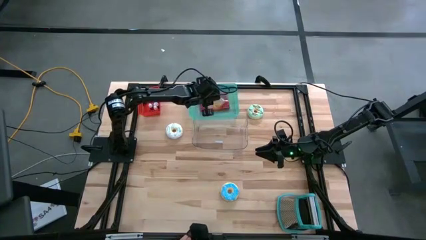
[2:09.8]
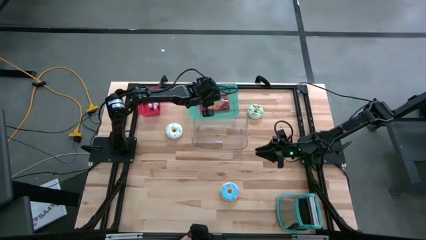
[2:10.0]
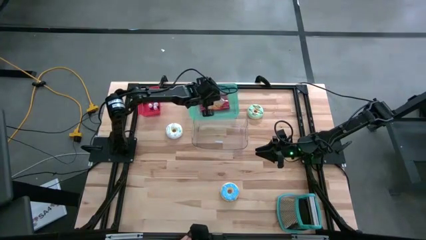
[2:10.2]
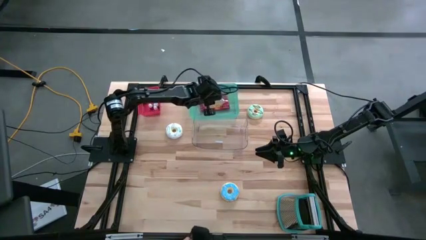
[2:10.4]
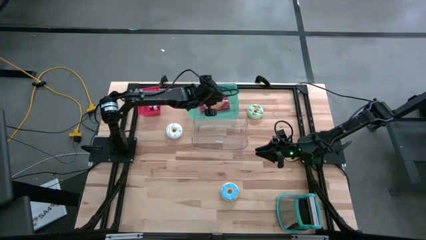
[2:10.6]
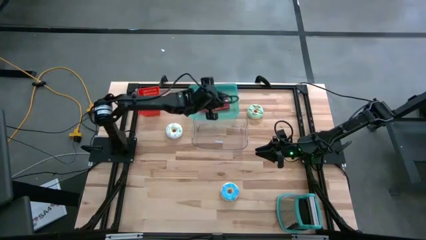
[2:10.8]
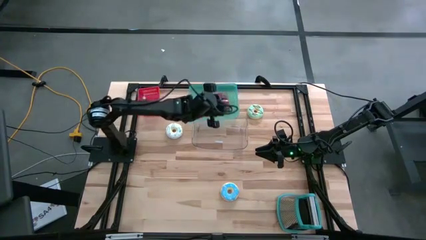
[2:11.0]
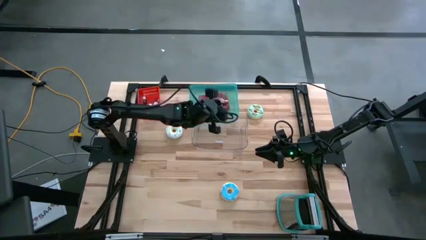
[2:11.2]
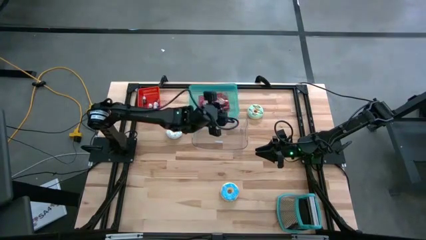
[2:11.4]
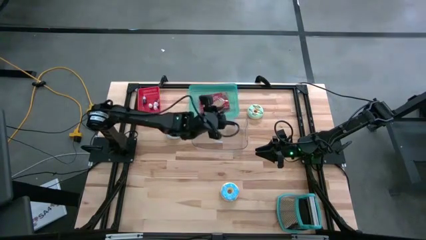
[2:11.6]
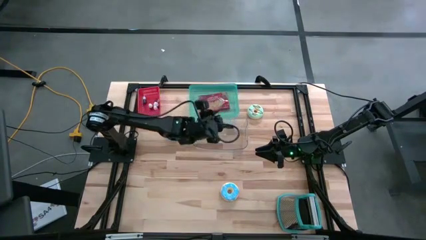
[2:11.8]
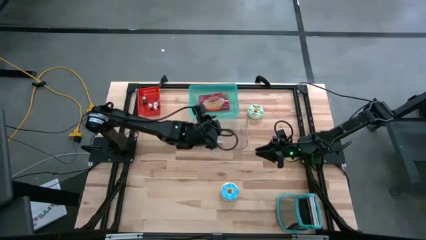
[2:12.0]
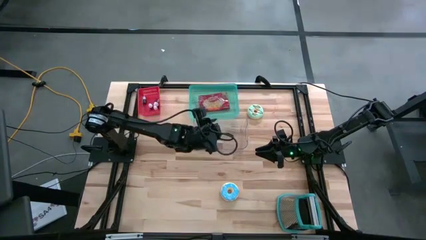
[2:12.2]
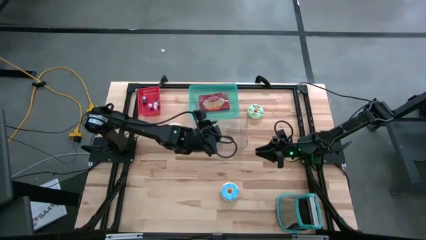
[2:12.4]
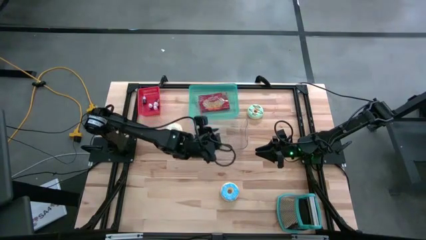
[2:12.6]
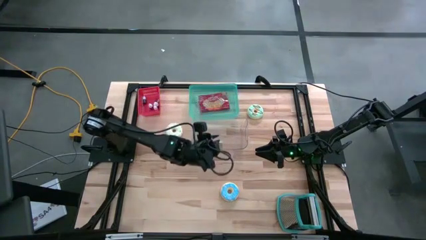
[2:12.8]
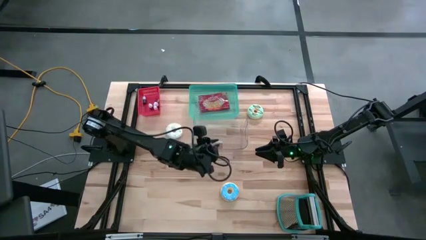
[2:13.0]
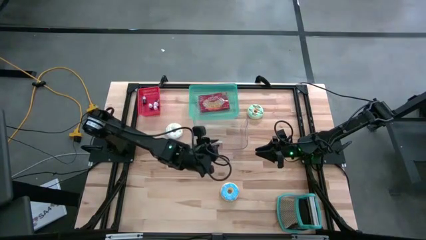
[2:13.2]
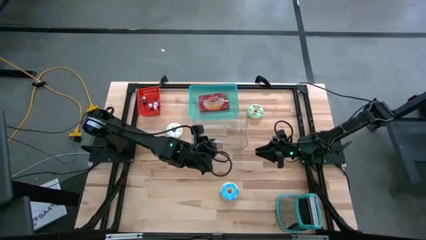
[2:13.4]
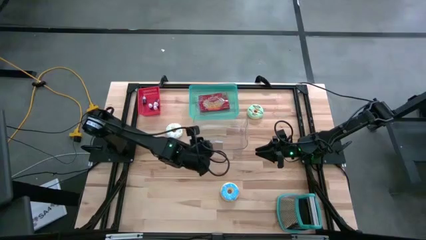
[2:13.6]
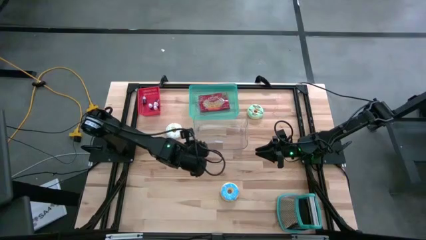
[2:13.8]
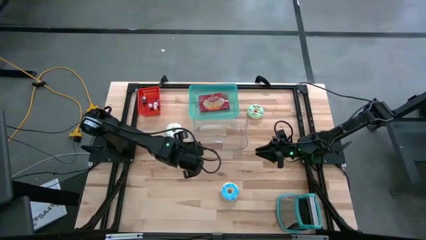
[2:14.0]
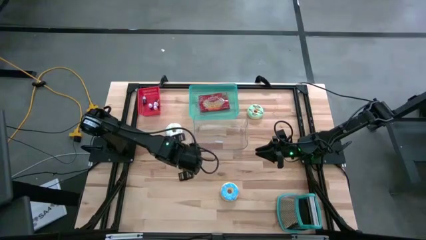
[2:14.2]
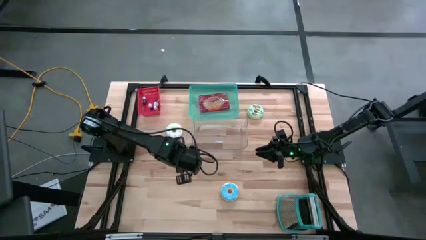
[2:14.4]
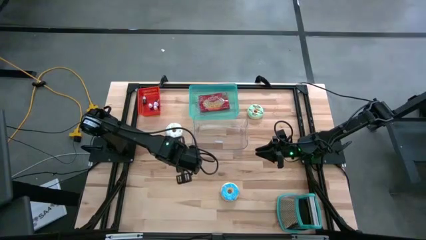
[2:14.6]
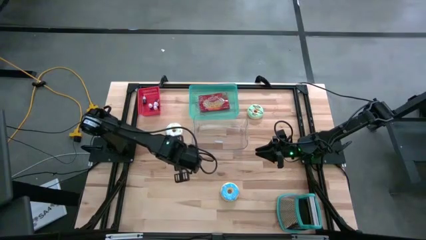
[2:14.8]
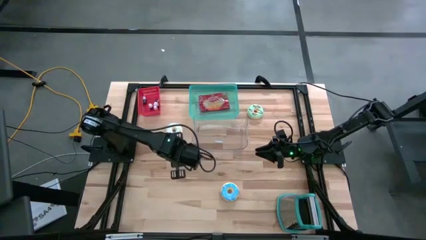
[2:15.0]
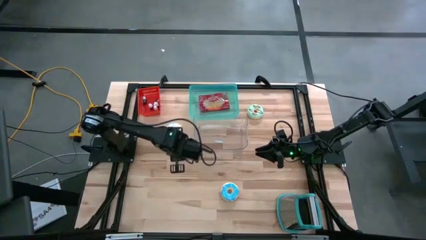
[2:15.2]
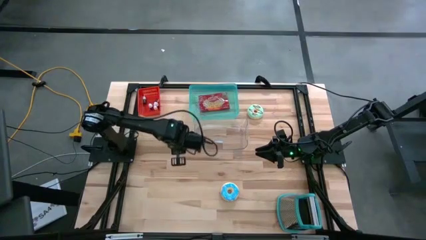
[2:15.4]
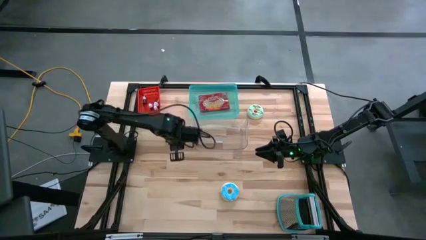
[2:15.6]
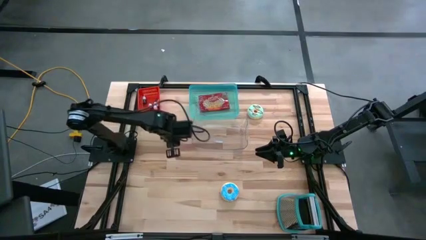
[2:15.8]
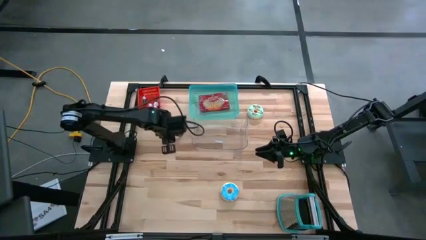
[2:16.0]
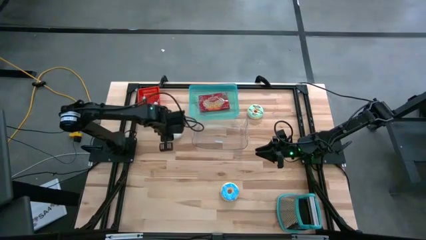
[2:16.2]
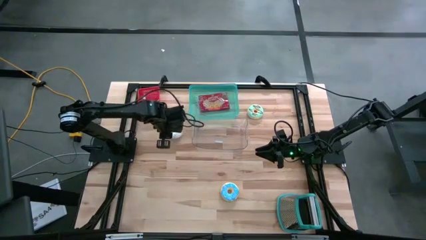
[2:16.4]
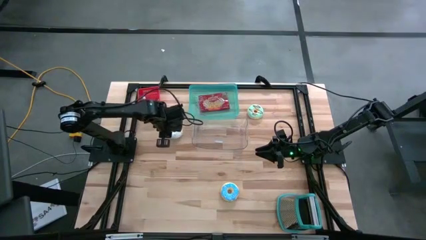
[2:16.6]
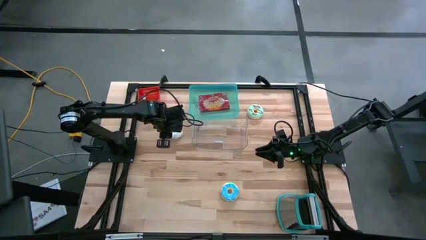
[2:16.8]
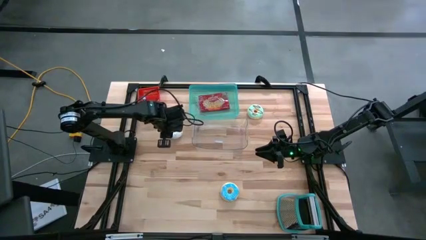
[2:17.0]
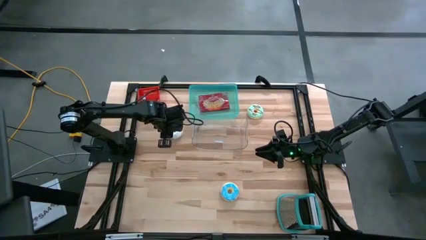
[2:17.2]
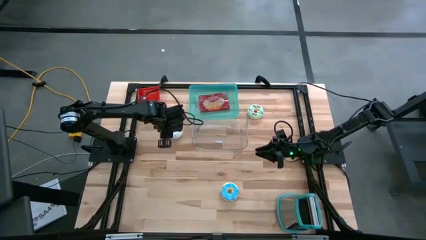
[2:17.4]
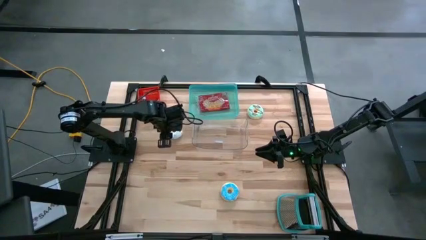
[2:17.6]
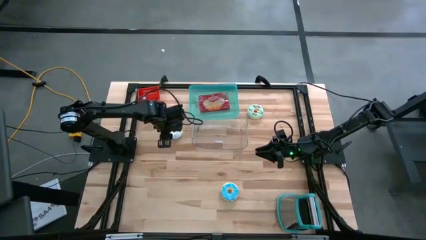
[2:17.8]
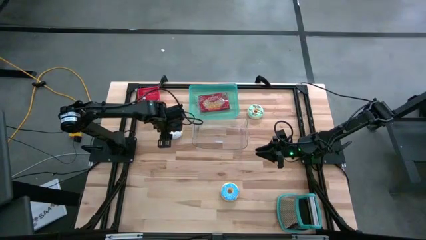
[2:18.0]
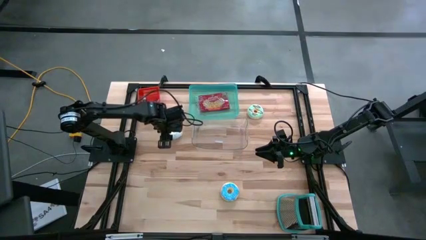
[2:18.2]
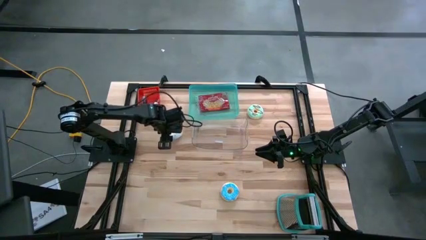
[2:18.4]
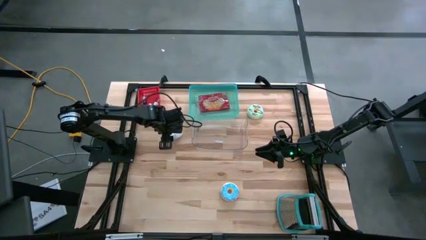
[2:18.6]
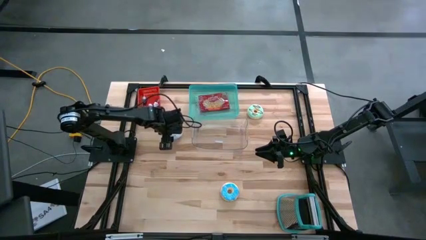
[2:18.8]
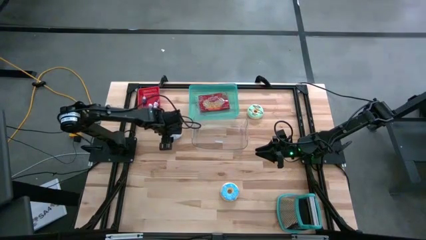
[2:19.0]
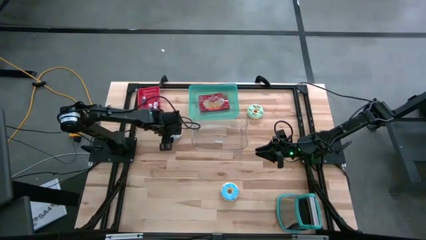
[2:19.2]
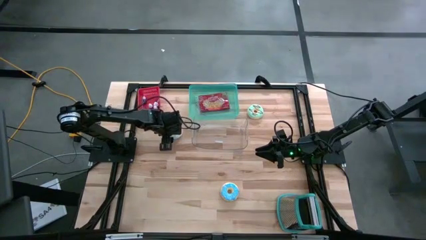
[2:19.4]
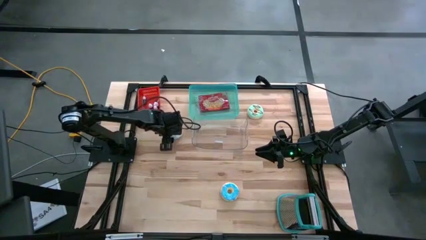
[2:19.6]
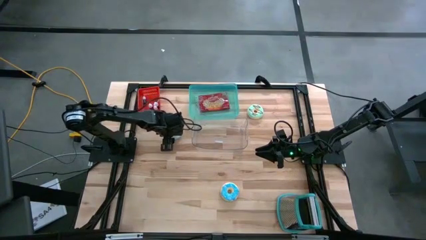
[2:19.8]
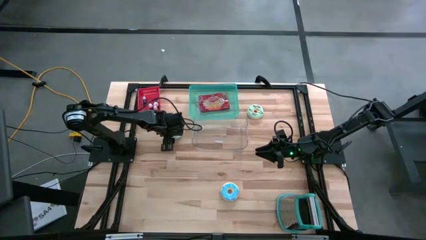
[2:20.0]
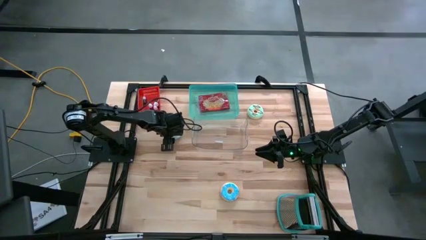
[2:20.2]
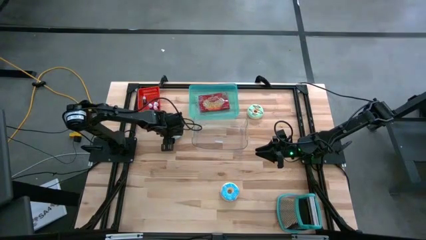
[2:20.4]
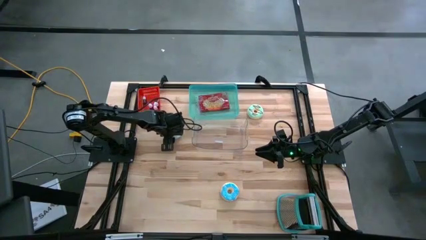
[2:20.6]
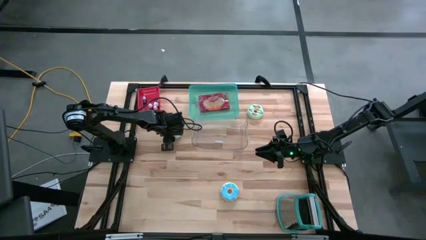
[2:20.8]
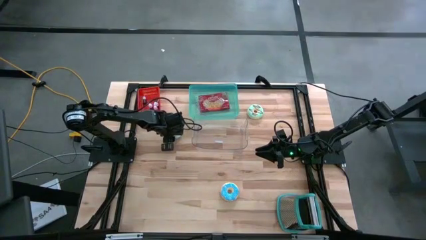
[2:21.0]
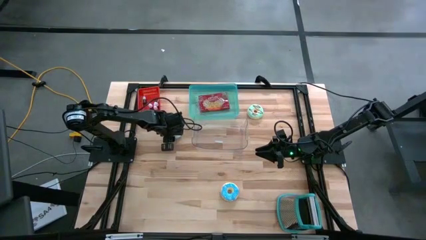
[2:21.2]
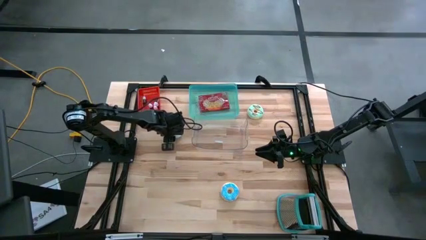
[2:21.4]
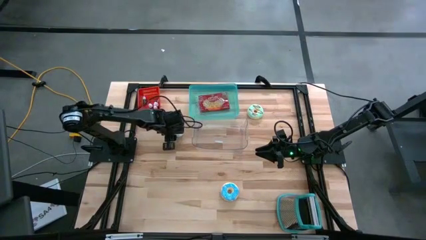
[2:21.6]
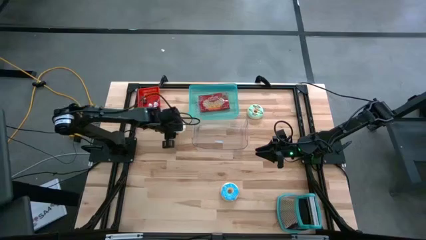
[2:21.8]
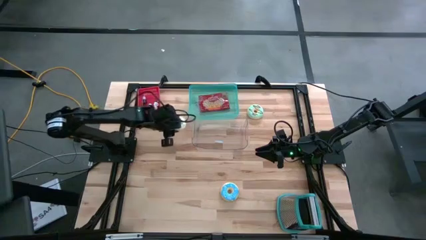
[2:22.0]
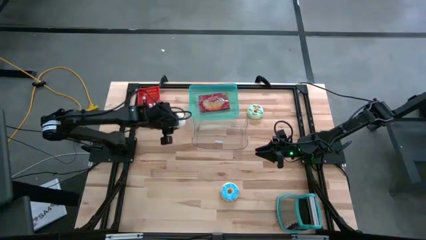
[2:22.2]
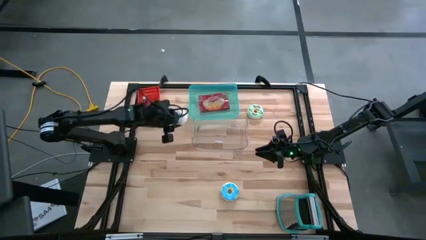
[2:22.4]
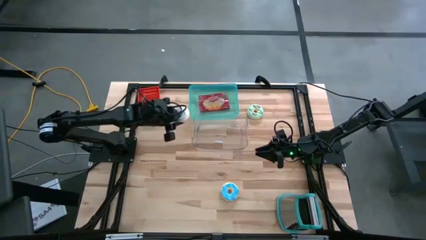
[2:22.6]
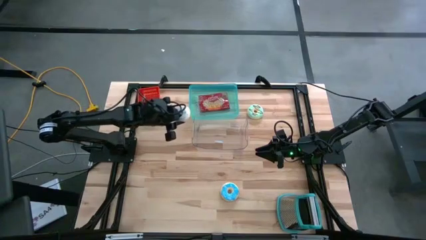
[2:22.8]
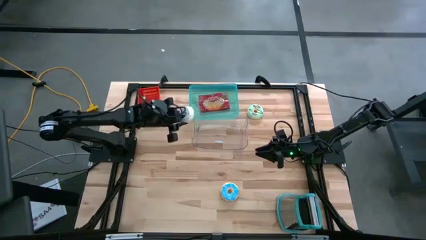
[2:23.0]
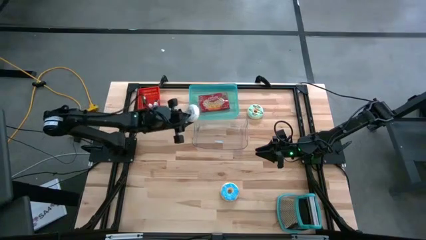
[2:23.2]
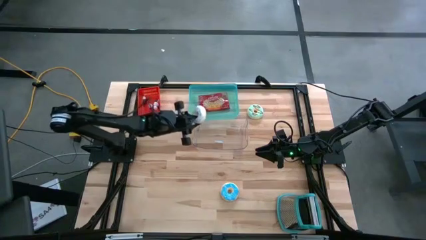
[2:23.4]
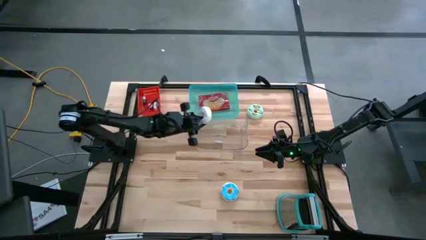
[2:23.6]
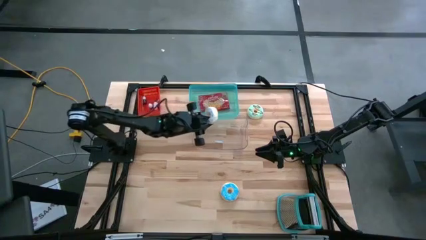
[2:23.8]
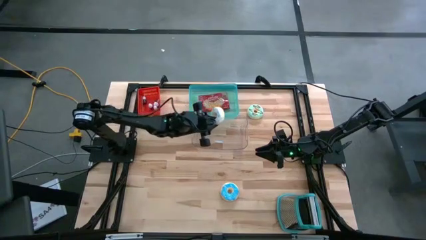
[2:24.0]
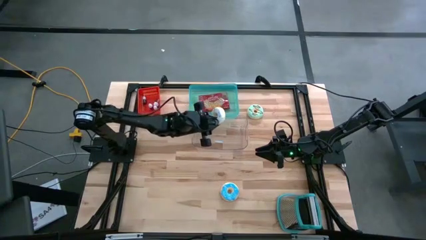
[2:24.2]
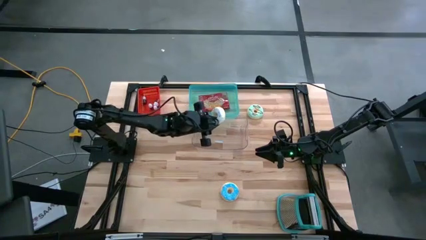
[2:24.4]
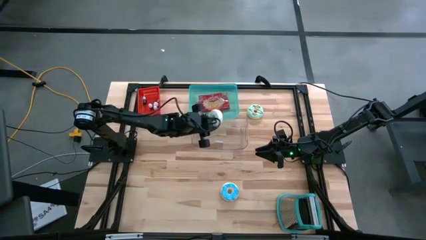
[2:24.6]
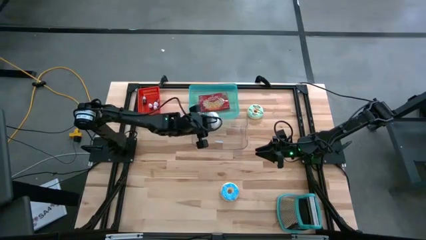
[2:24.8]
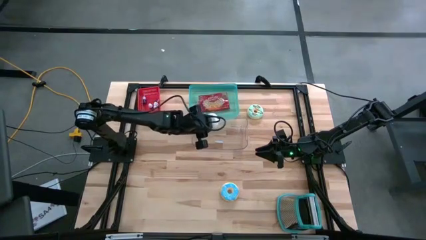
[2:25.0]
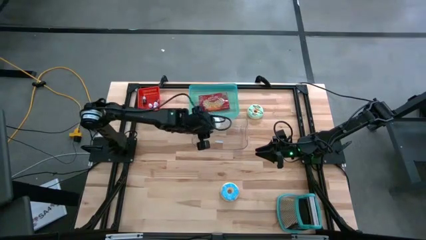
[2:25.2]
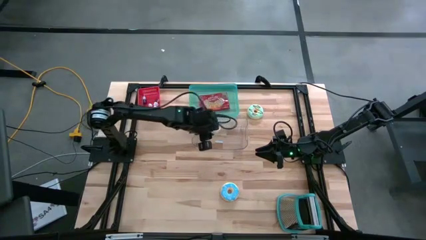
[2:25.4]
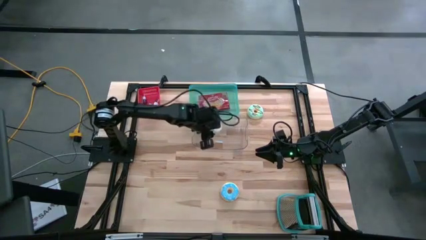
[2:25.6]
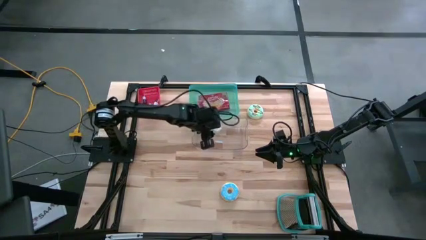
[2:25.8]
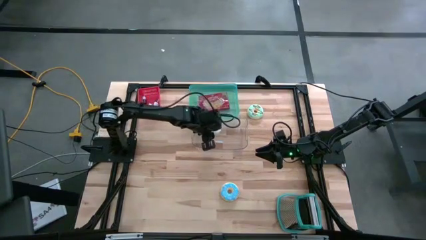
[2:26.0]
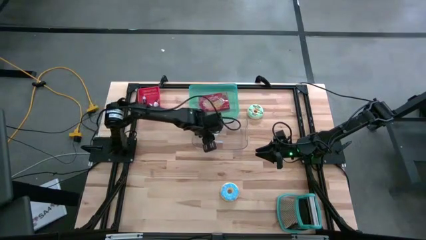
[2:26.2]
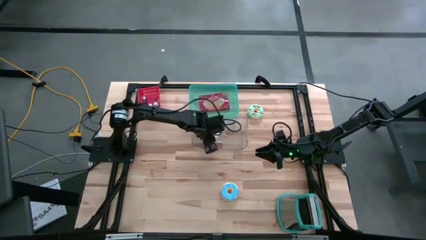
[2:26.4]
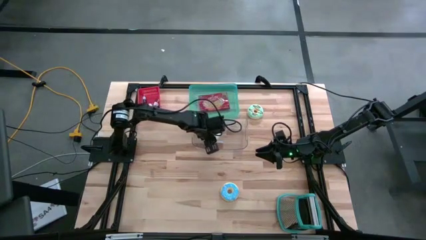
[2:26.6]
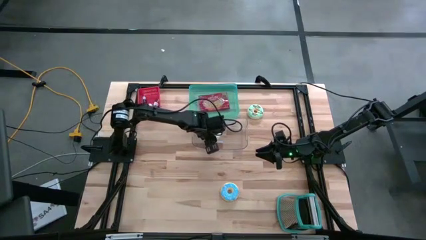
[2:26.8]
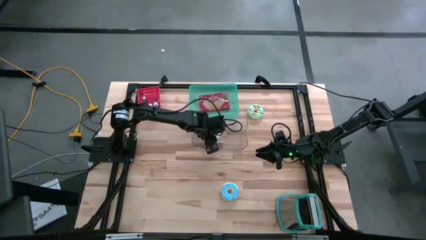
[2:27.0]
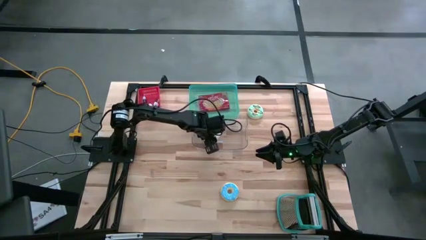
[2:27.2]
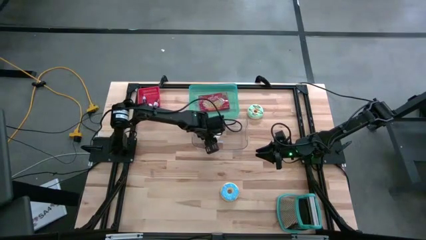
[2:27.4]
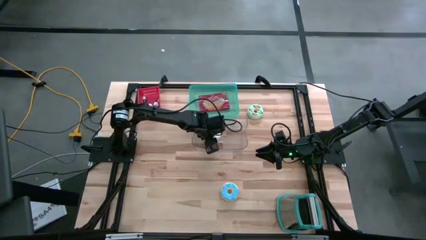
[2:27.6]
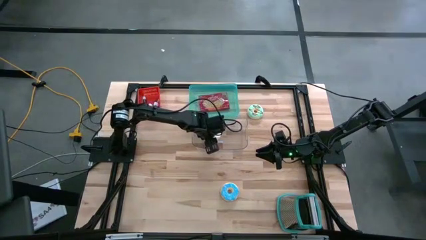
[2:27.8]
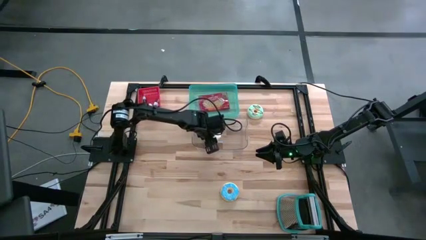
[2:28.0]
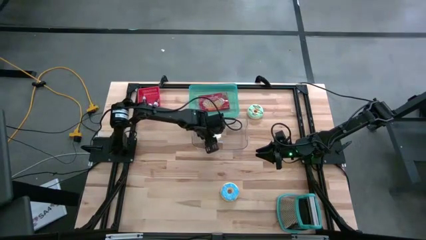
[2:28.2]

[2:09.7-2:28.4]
Put the white donut into the transparent bin
